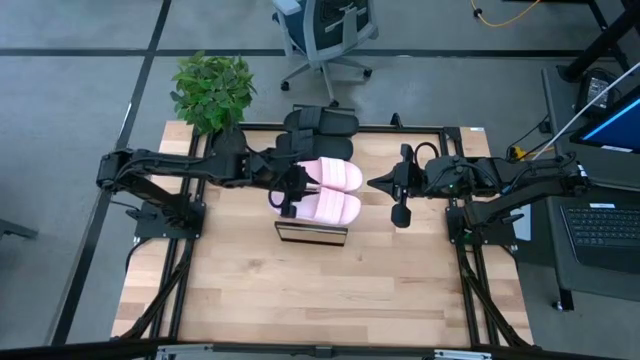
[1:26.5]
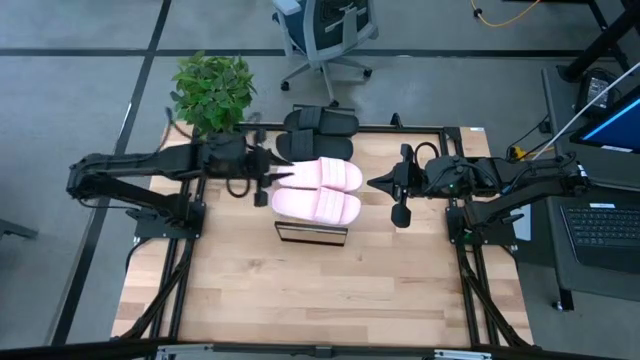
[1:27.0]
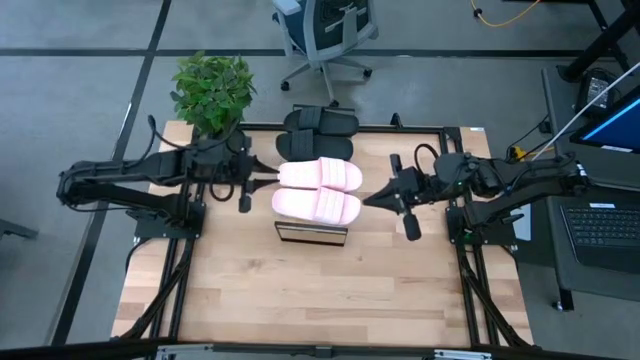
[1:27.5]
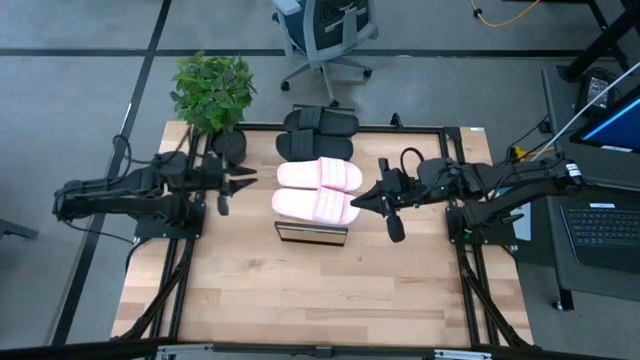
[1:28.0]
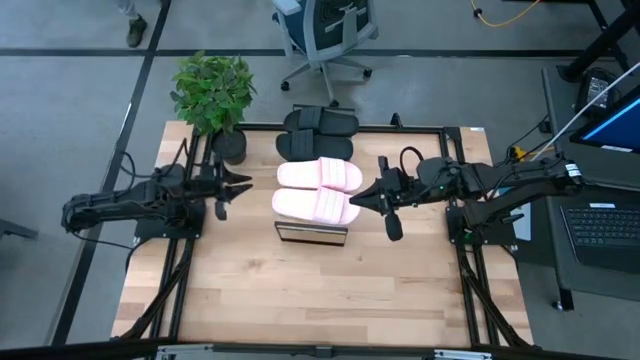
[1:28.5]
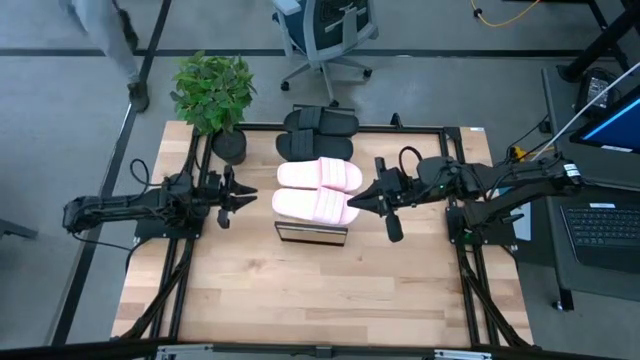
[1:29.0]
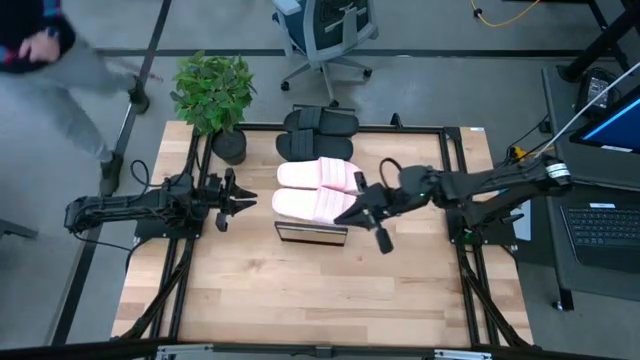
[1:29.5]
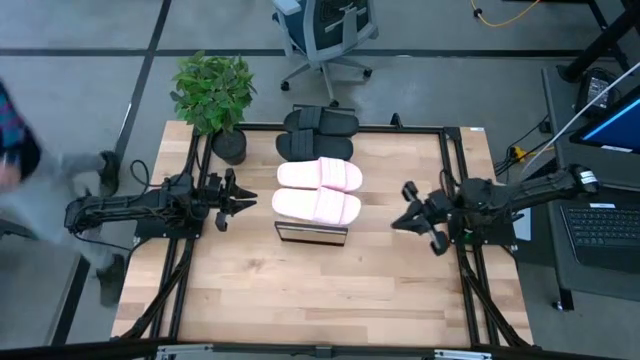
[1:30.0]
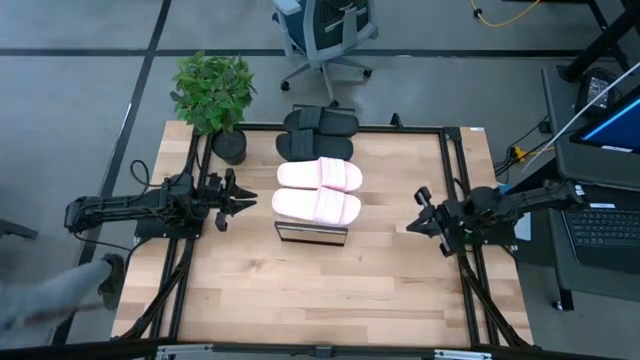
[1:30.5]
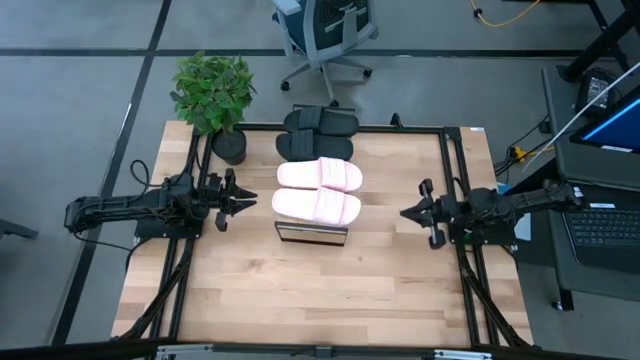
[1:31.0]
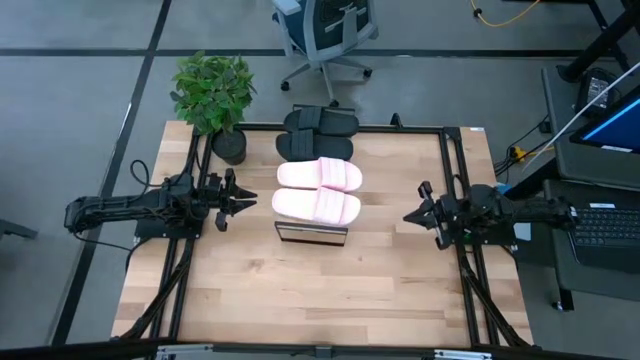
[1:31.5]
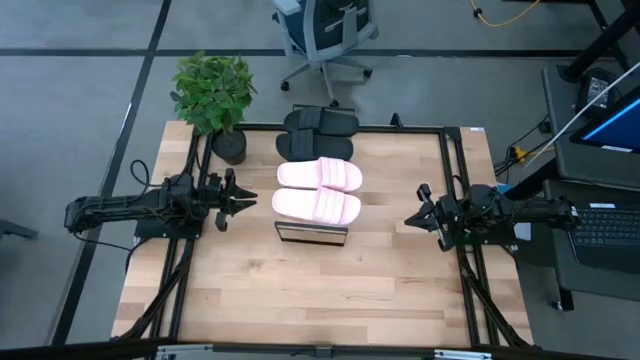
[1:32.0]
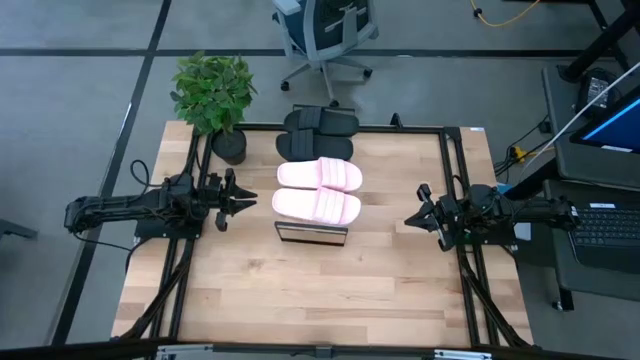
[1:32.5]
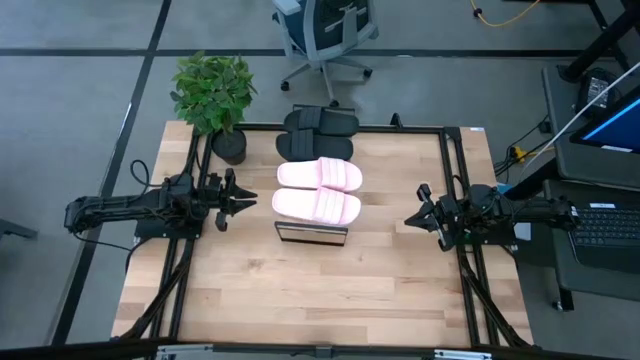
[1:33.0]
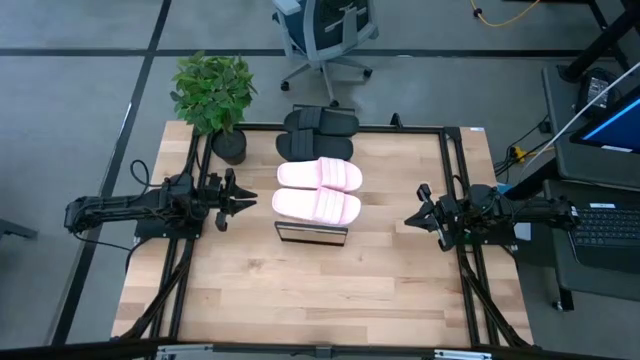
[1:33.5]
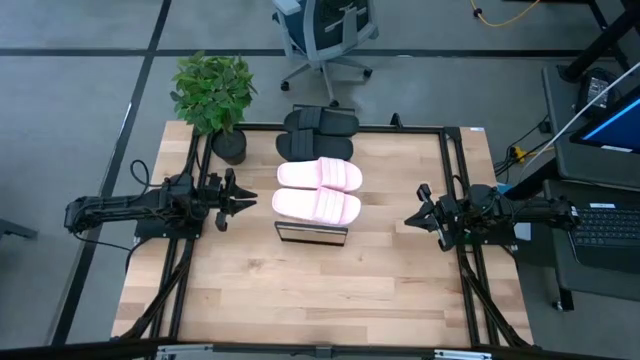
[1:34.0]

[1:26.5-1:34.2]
Task: Pick and place slides into the shelf
Return to Home Position

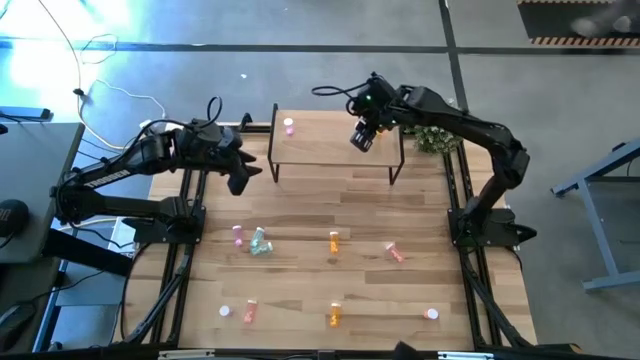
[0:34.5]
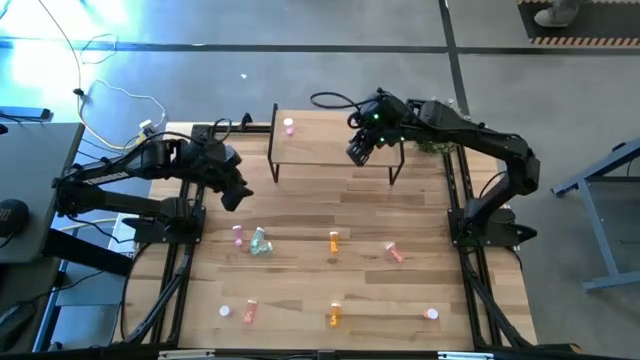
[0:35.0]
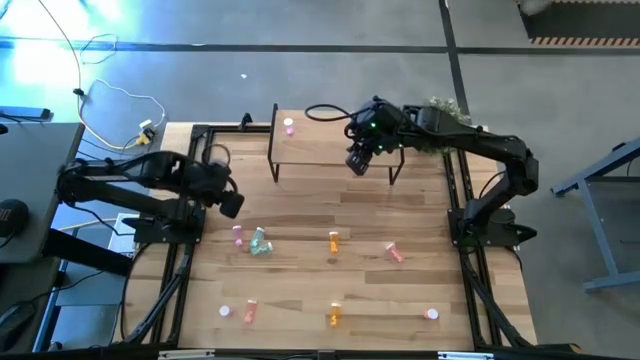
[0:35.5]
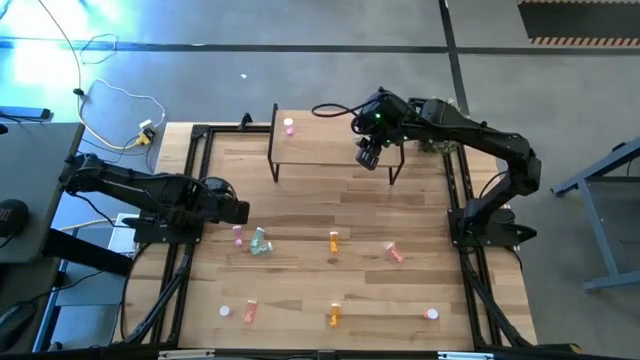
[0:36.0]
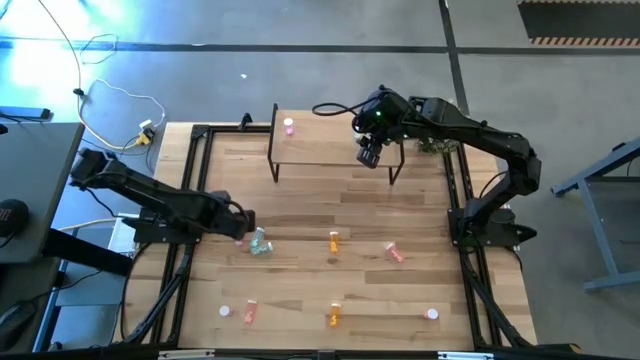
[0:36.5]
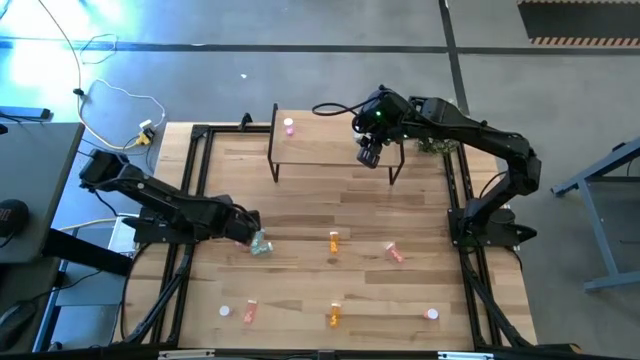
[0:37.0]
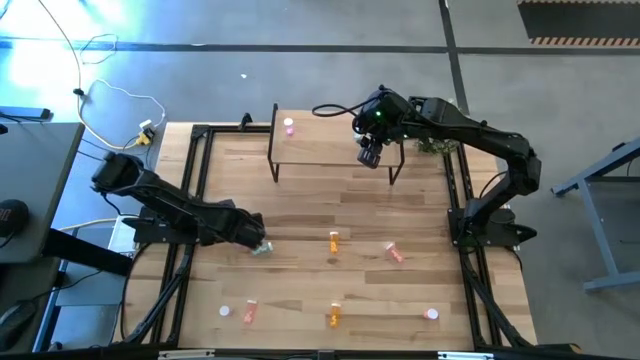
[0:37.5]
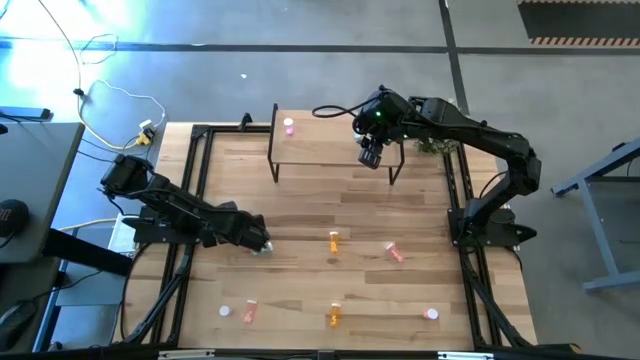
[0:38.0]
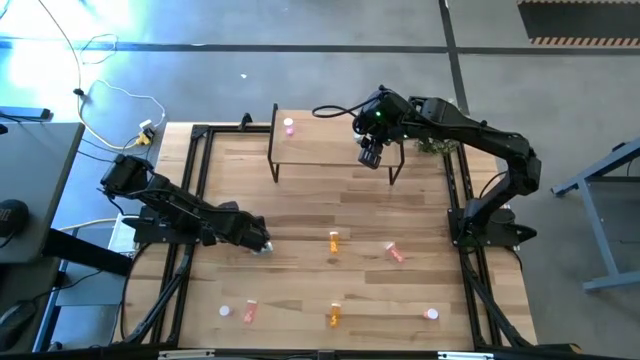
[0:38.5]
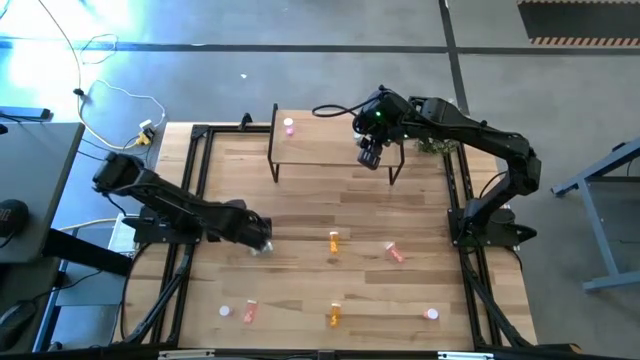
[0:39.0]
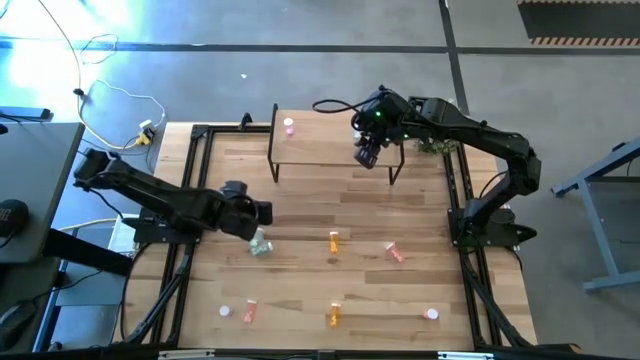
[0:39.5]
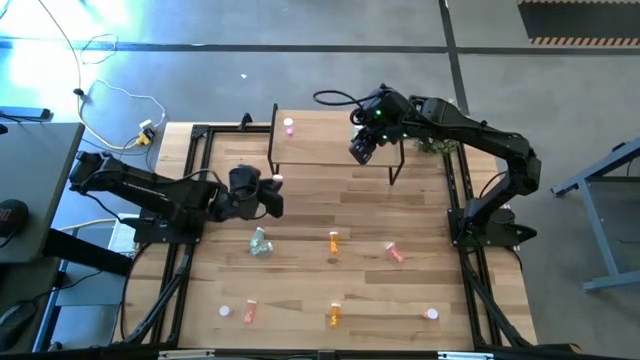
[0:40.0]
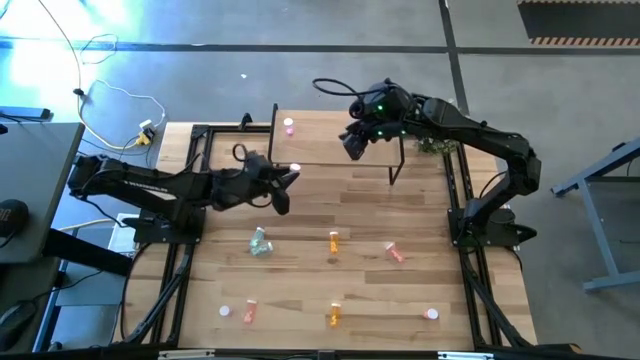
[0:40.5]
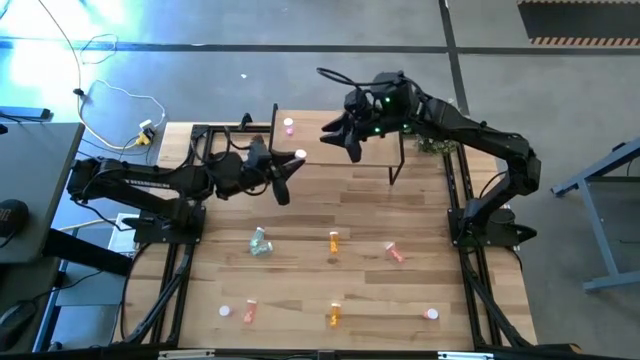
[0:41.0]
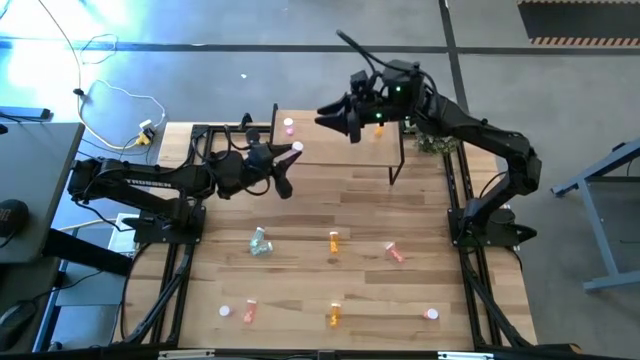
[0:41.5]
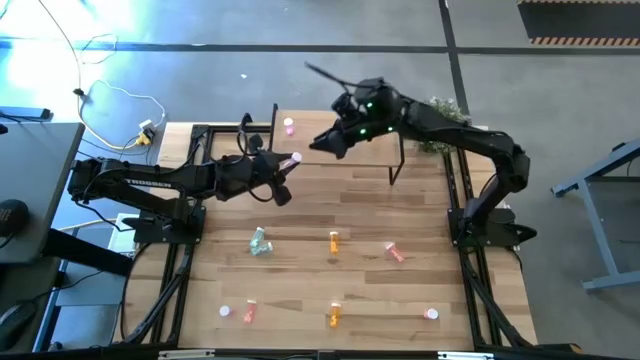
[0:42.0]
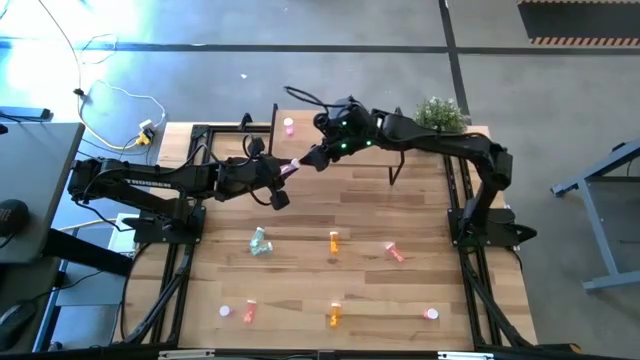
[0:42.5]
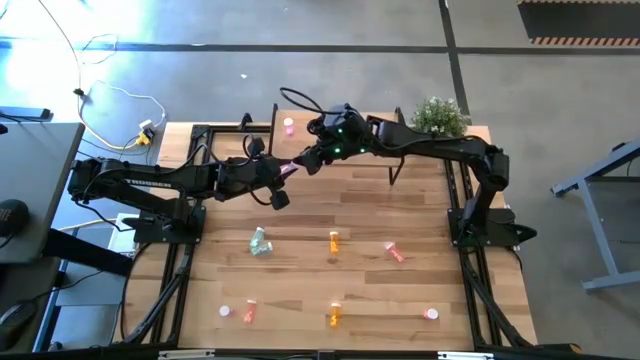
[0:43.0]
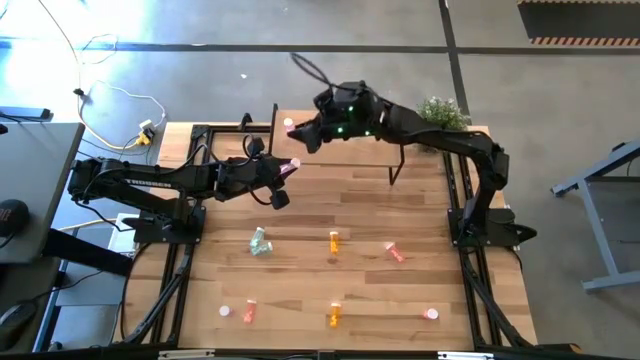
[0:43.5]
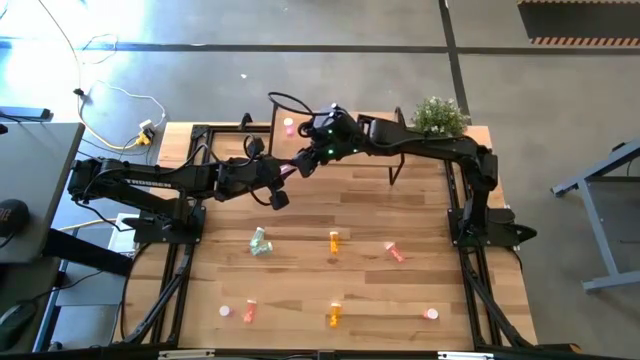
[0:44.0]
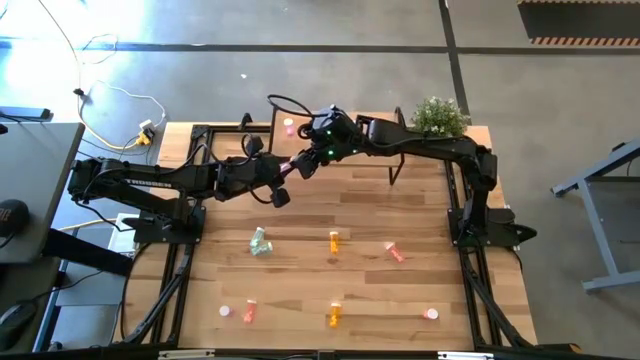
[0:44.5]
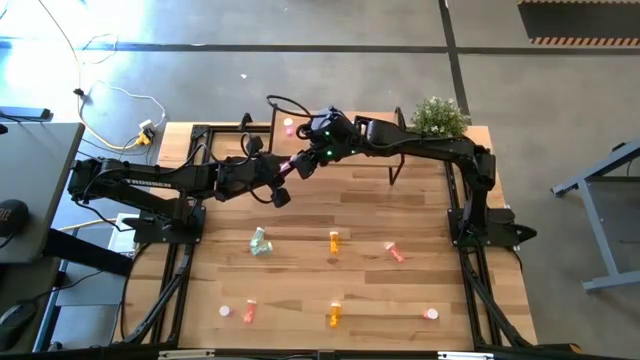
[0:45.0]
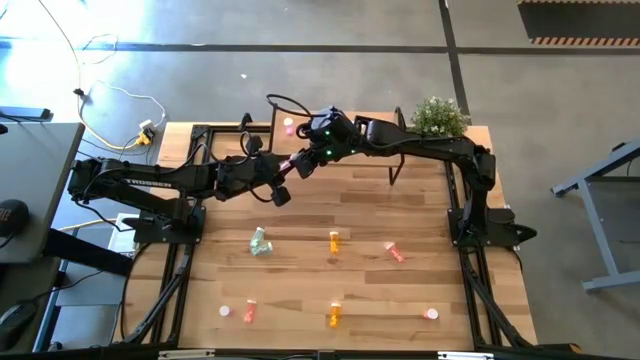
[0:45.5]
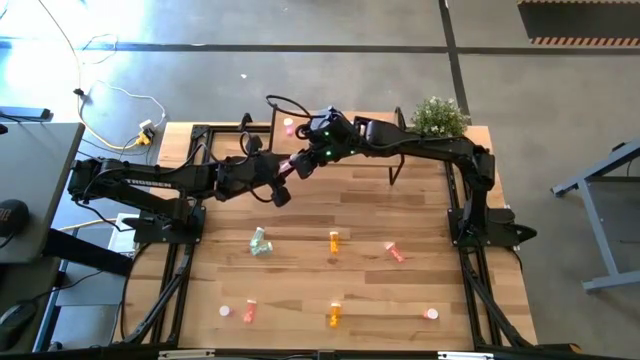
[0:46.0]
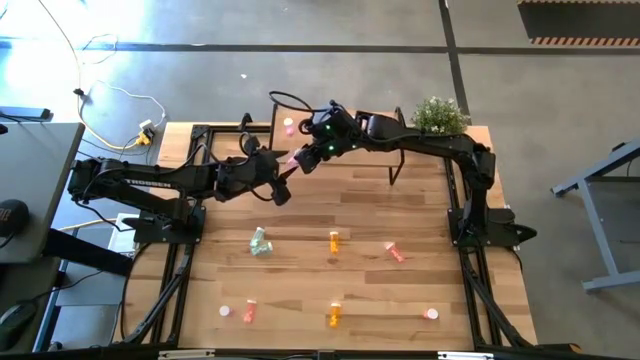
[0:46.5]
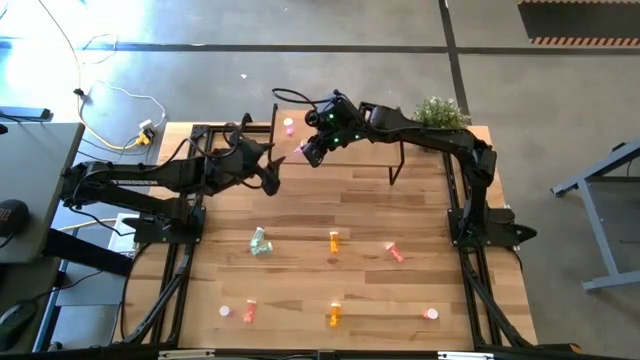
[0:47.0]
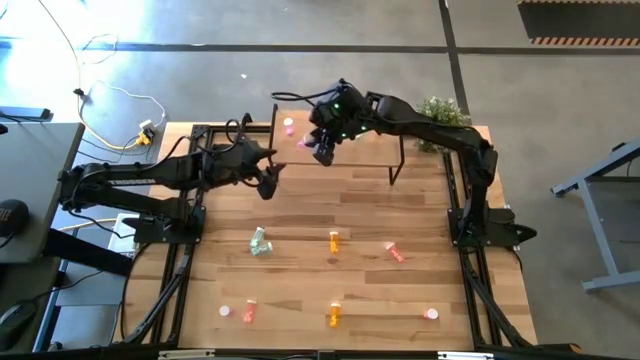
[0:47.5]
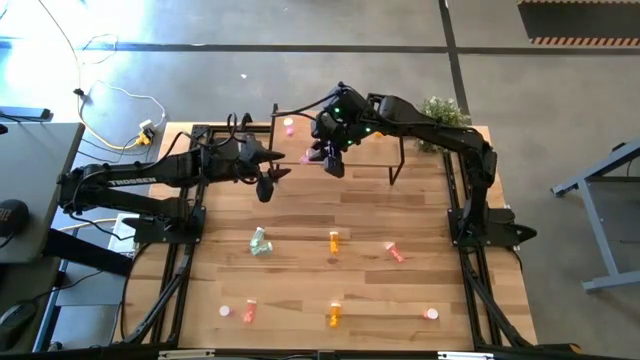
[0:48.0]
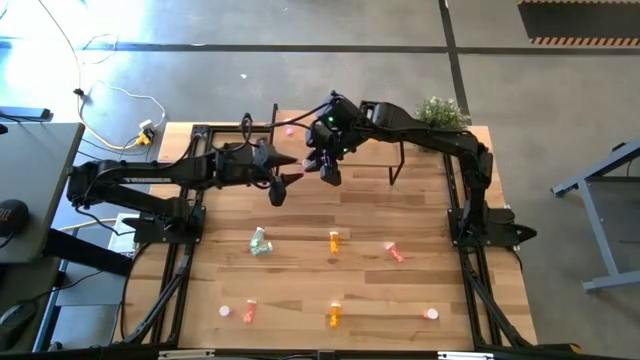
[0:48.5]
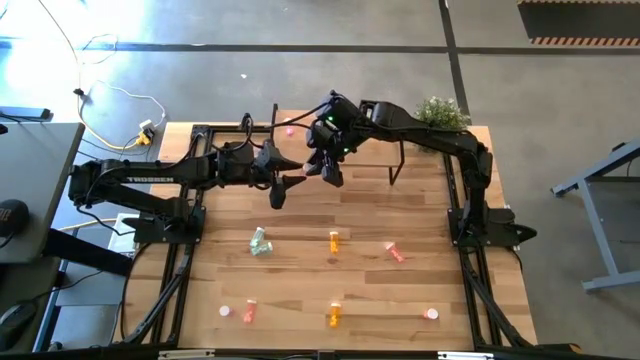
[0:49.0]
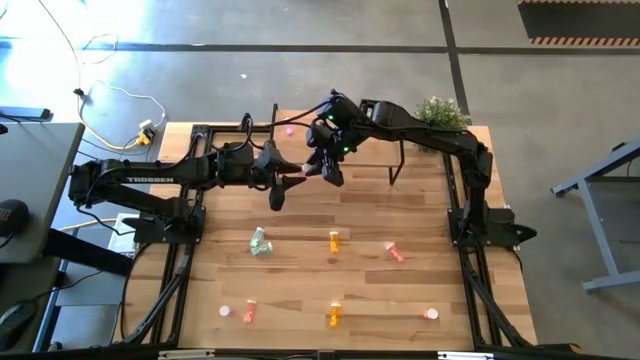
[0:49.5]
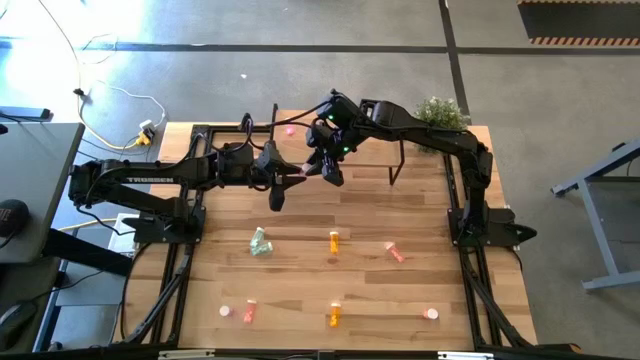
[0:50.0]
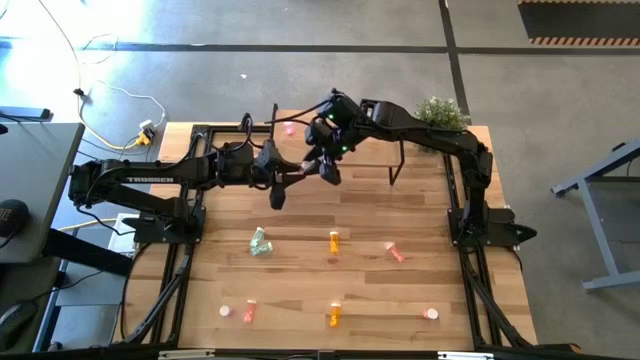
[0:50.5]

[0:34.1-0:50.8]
Task: Pick and place medicine bottles onto shelf by color
Put the top violet pill bottle aligned with the other violet pill bottle on the shelf
